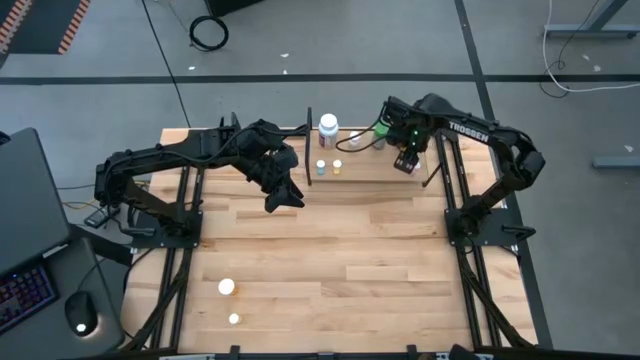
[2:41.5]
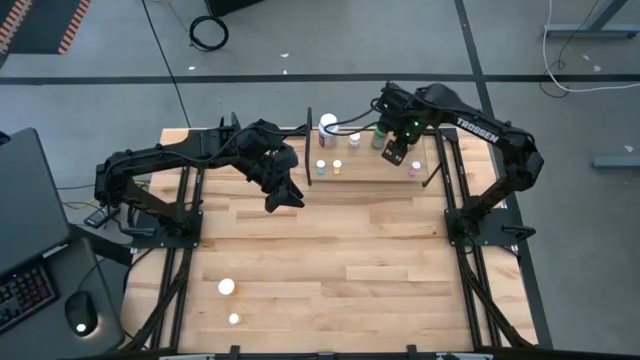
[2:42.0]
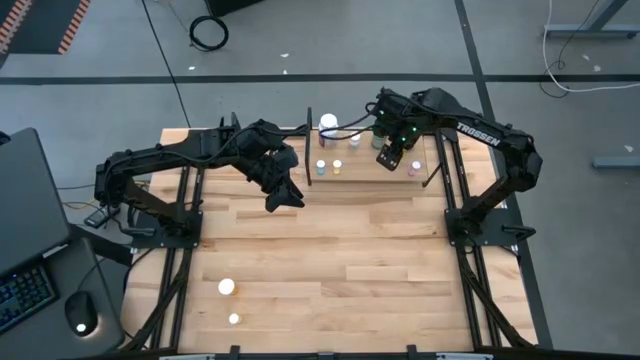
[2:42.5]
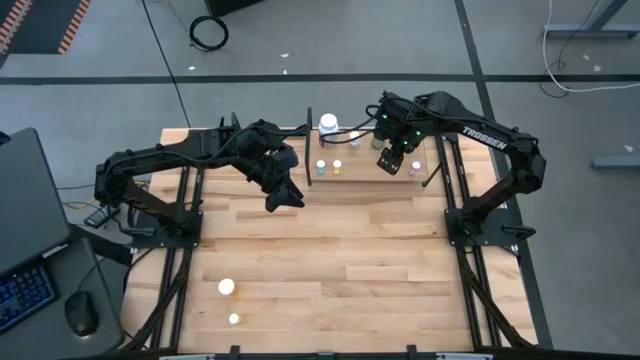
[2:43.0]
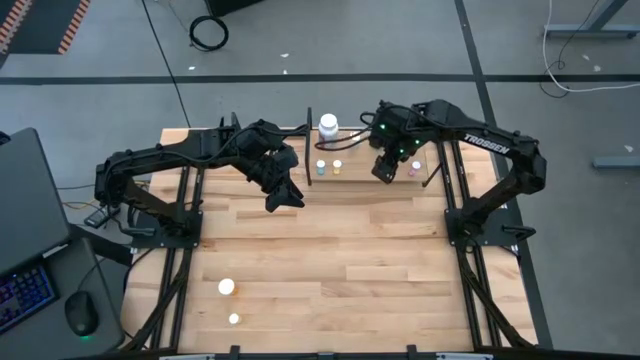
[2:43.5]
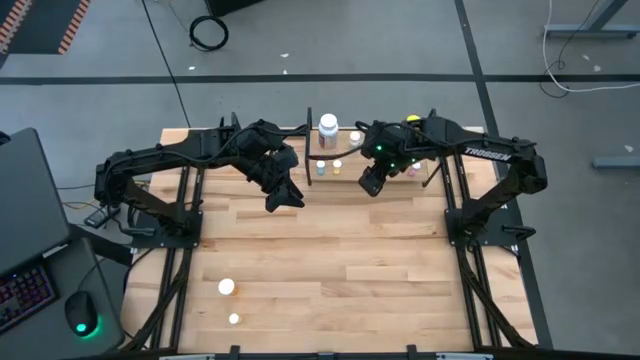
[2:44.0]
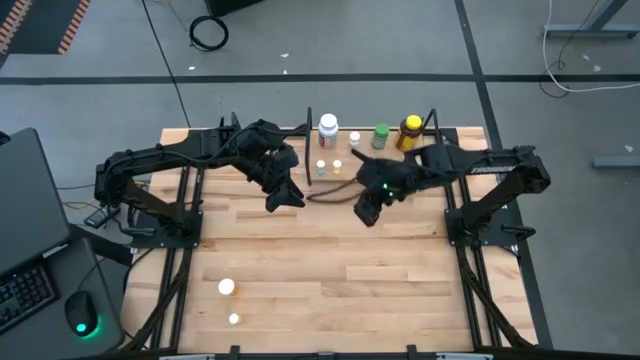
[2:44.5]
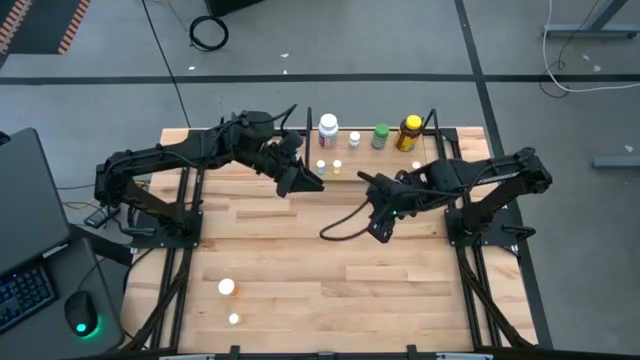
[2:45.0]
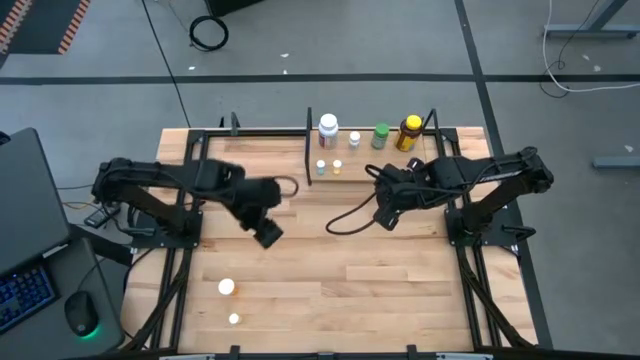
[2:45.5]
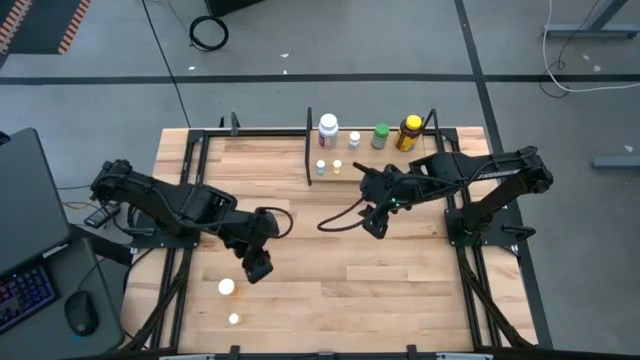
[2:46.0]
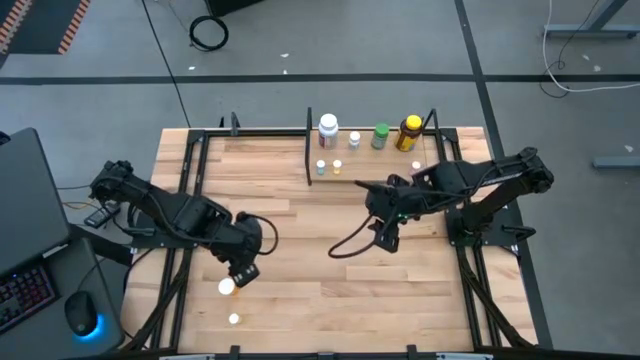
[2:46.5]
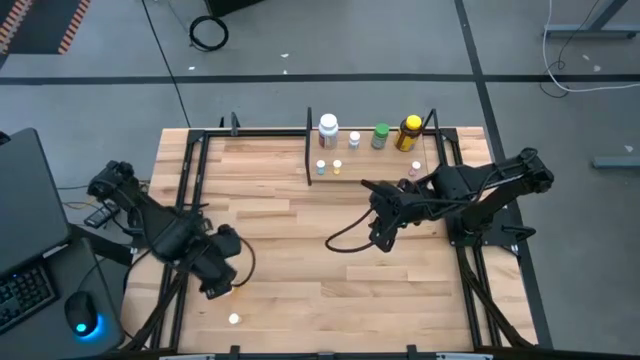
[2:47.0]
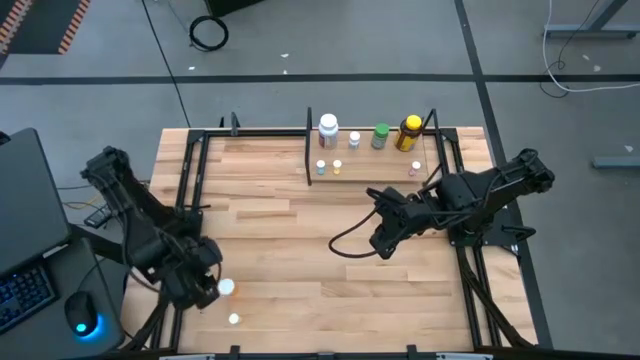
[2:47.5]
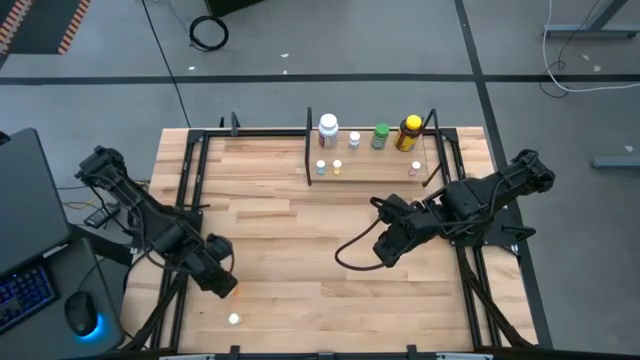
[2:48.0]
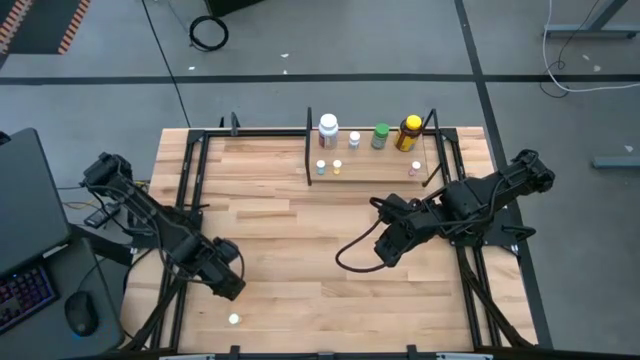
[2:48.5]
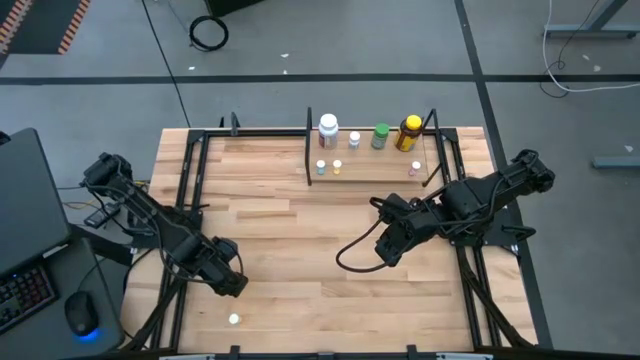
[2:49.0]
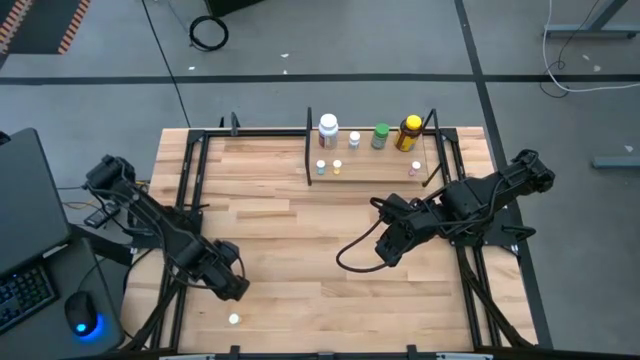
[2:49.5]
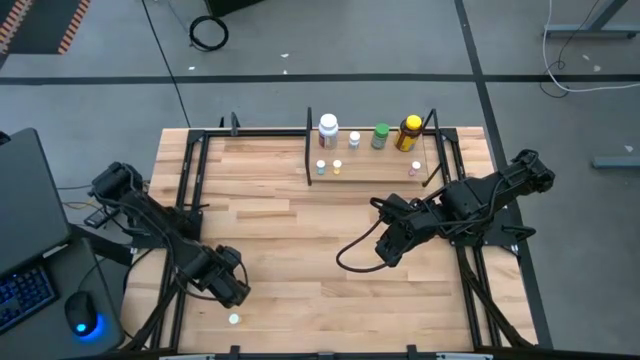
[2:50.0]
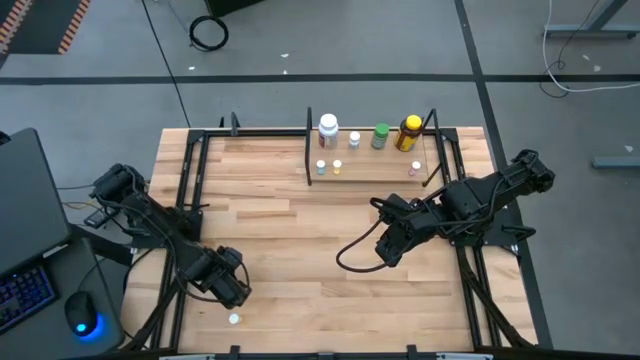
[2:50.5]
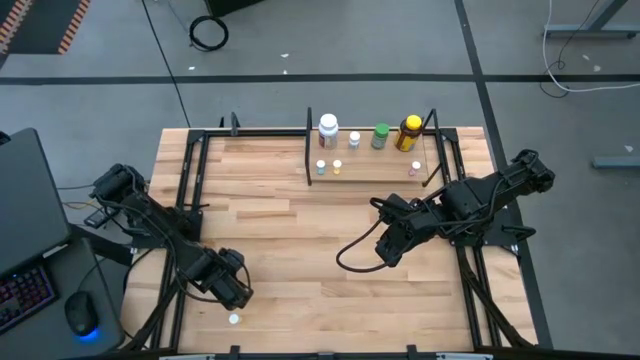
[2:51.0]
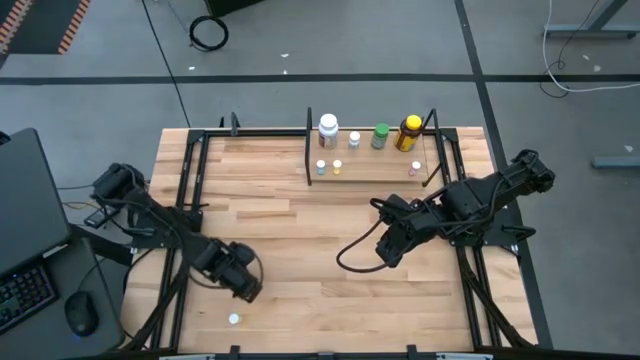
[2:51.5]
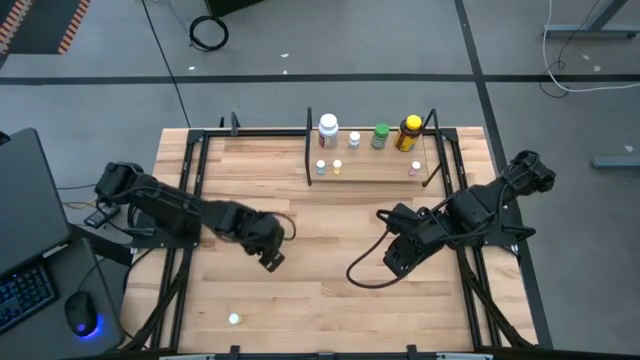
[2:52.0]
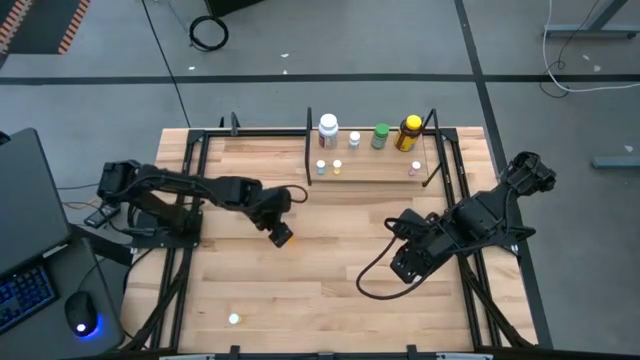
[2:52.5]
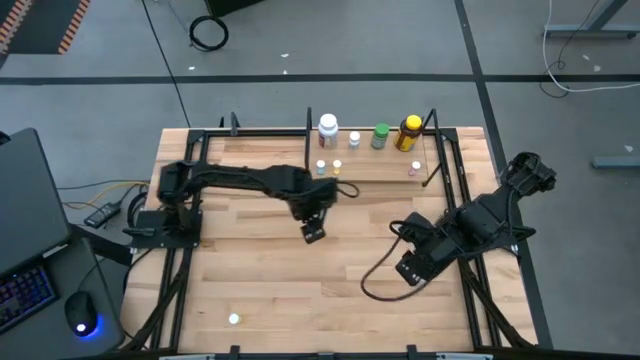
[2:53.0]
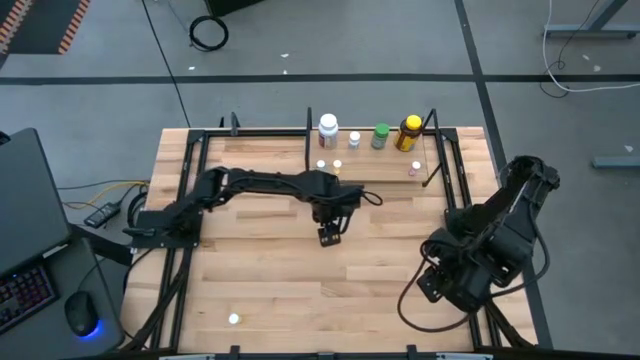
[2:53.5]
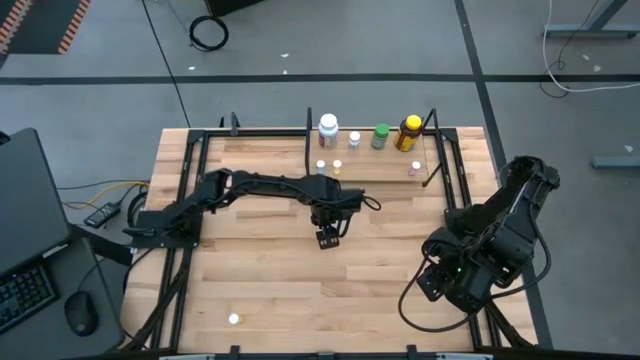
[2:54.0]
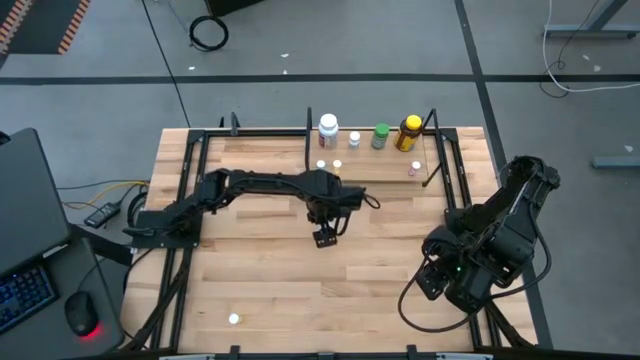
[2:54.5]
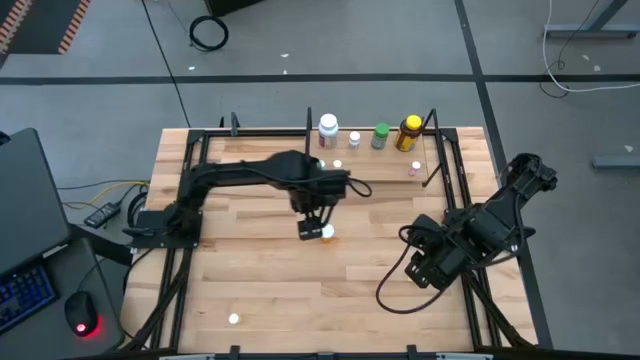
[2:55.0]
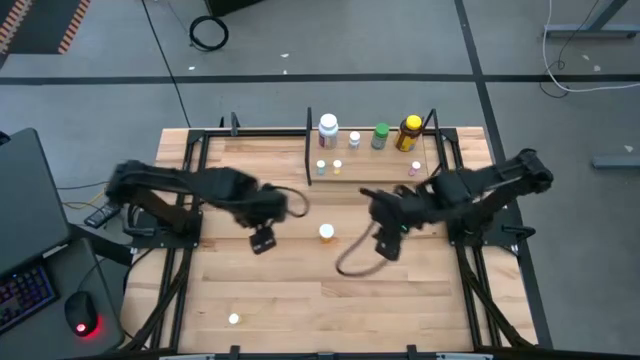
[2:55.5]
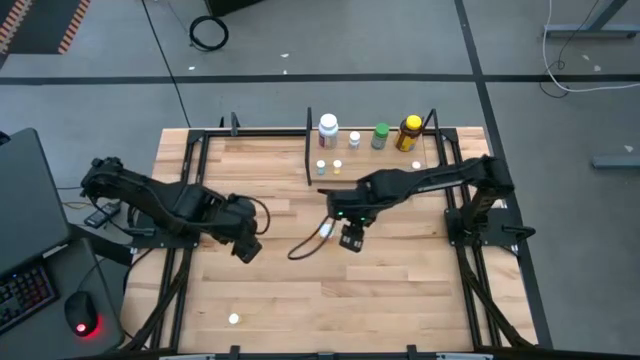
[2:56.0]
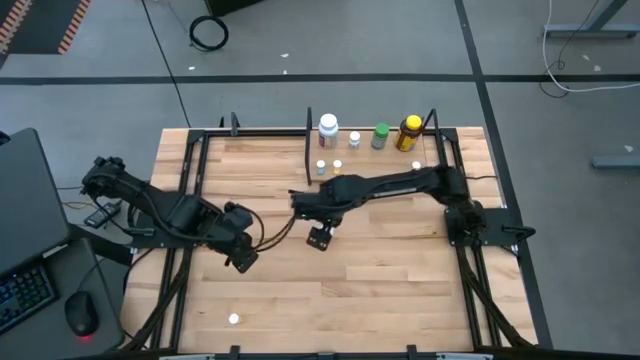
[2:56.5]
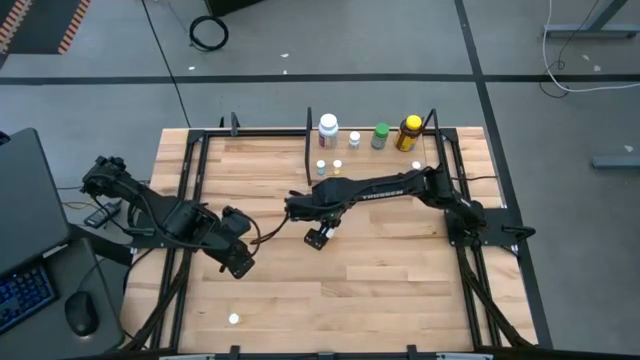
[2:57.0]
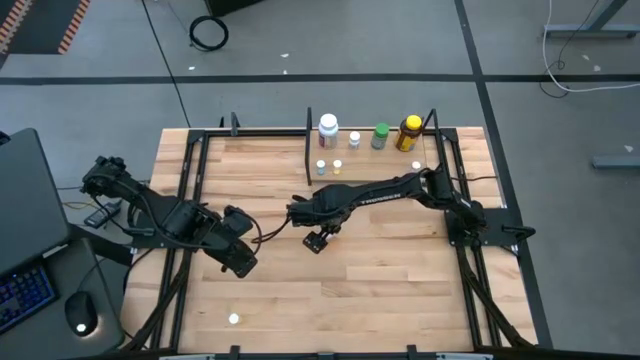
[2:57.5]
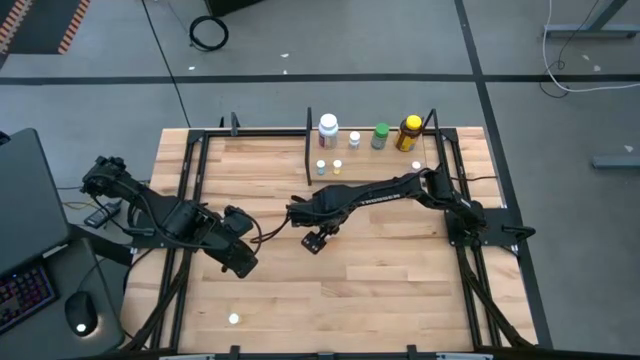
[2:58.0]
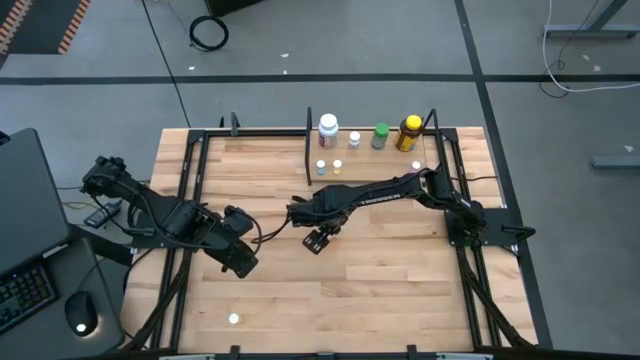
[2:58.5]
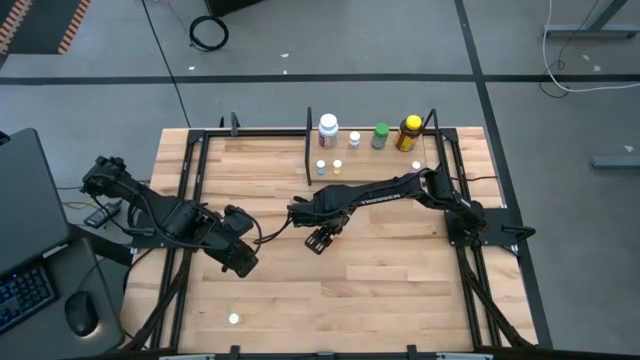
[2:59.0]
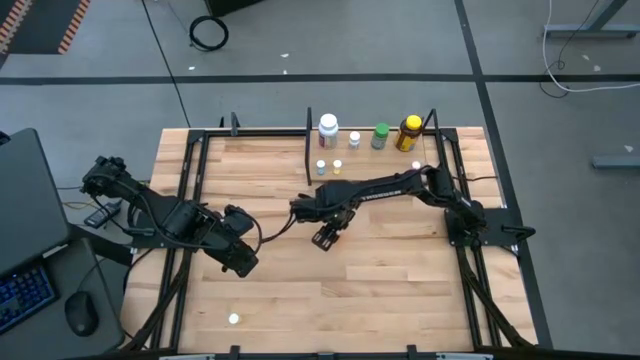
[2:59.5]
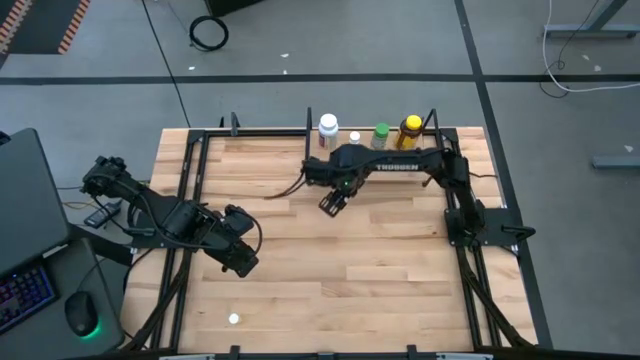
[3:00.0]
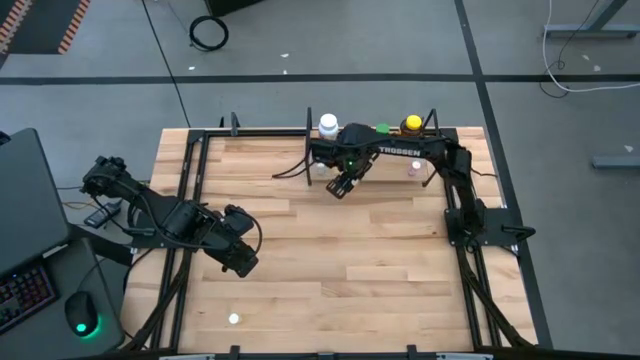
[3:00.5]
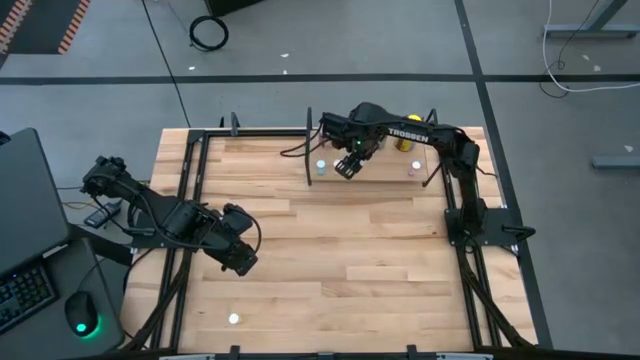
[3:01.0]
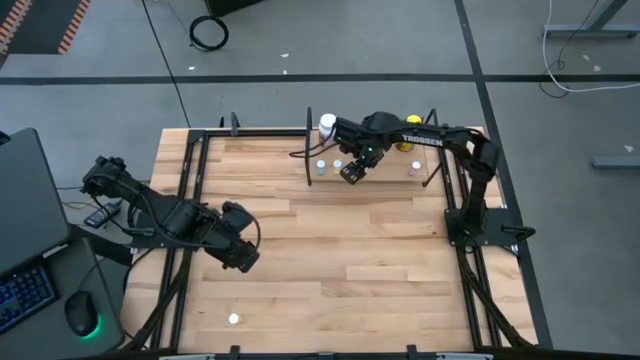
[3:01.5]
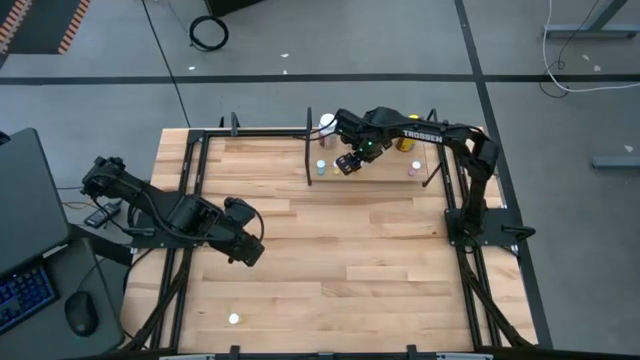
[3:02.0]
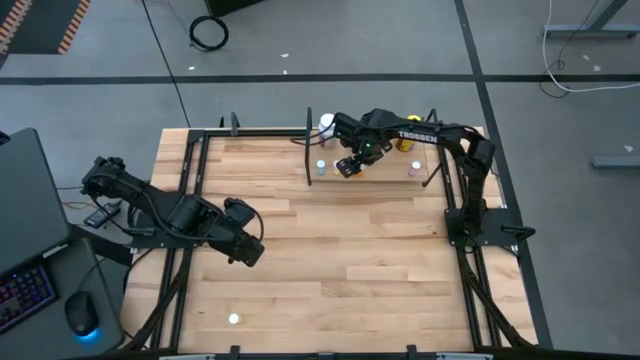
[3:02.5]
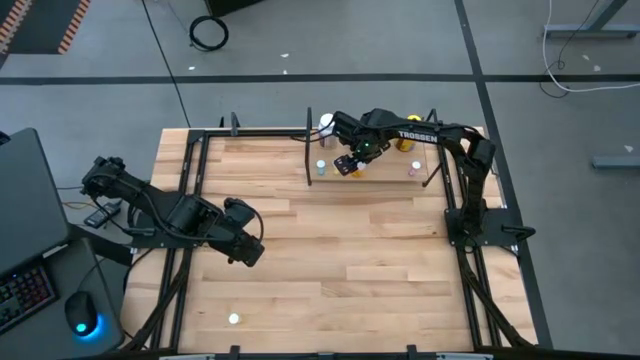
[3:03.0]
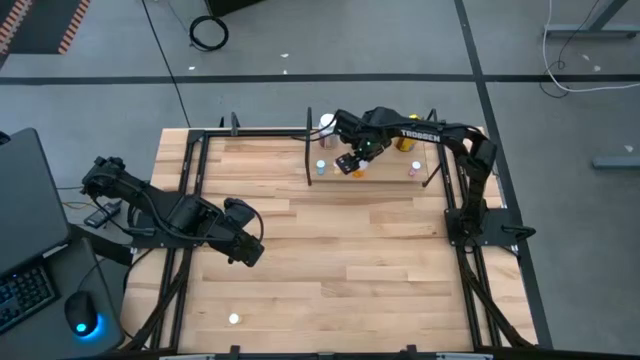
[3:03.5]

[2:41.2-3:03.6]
Task: Pick and place medicine bottles onto shelf by color
Put the orange pill bottle on the shelf
